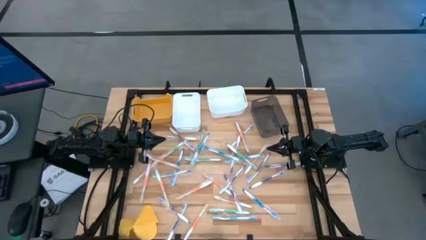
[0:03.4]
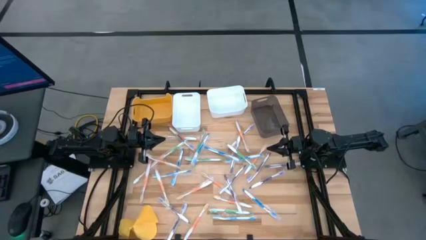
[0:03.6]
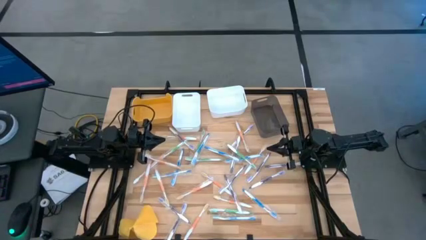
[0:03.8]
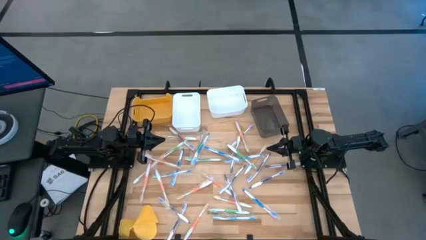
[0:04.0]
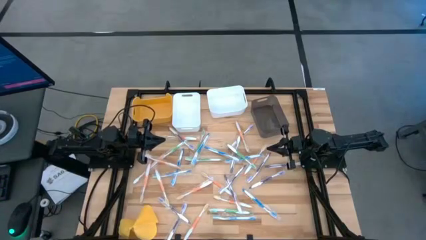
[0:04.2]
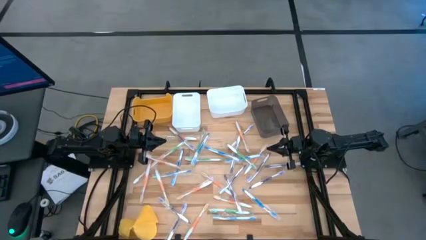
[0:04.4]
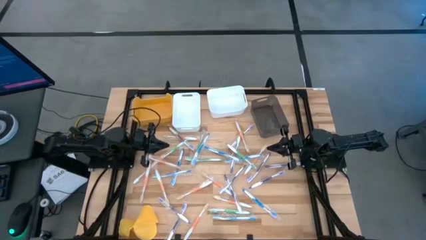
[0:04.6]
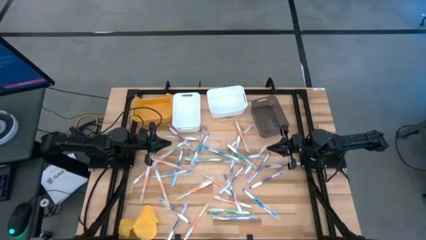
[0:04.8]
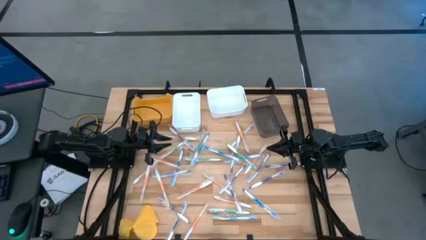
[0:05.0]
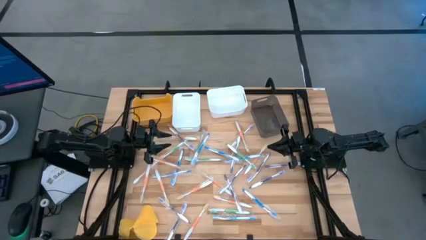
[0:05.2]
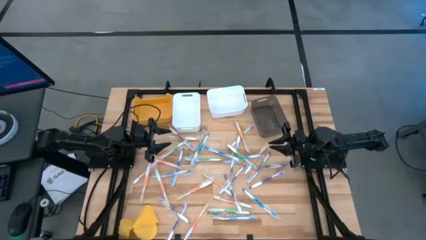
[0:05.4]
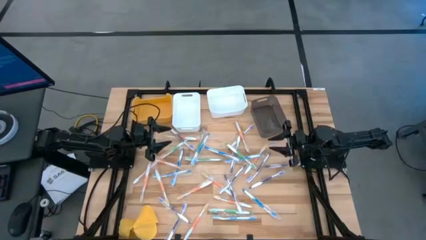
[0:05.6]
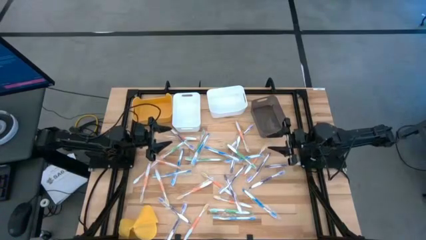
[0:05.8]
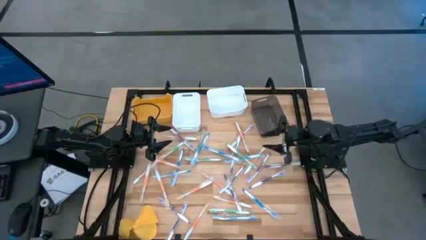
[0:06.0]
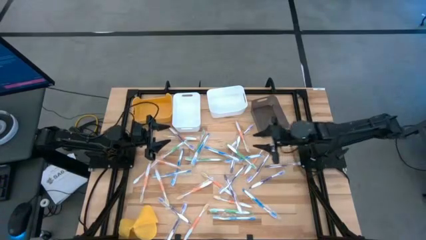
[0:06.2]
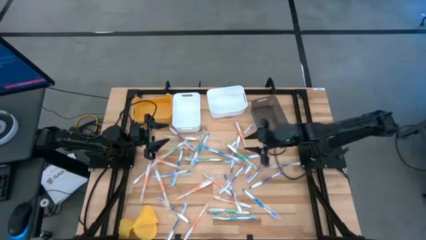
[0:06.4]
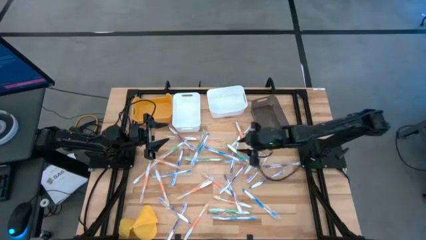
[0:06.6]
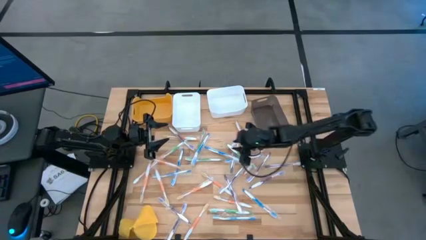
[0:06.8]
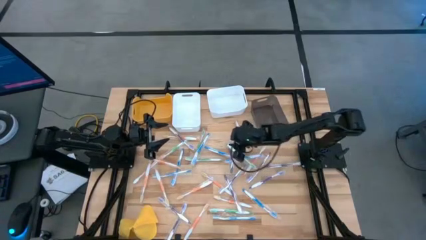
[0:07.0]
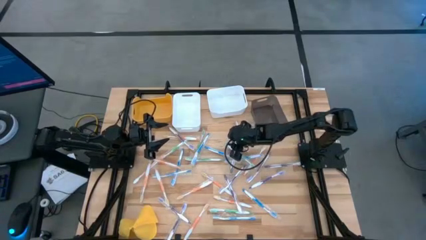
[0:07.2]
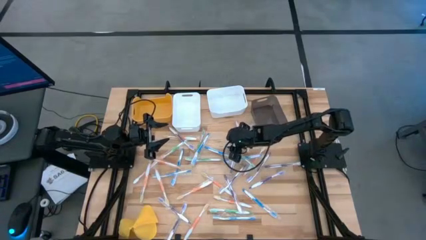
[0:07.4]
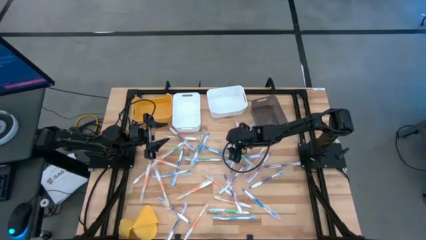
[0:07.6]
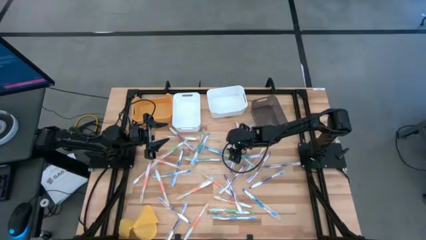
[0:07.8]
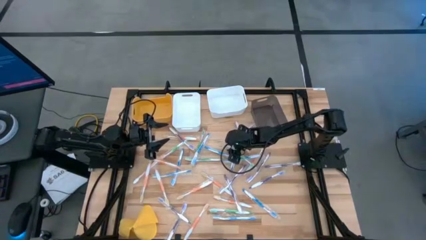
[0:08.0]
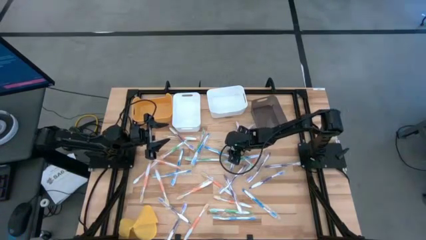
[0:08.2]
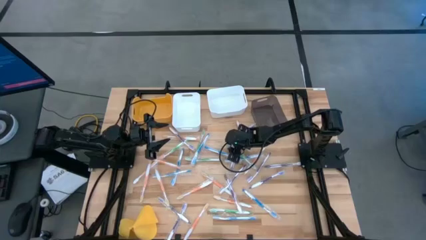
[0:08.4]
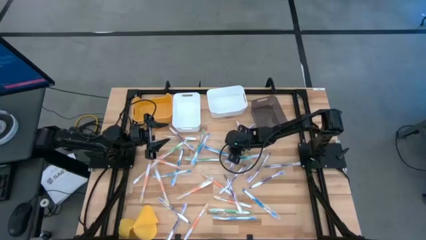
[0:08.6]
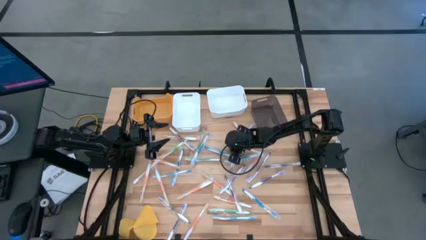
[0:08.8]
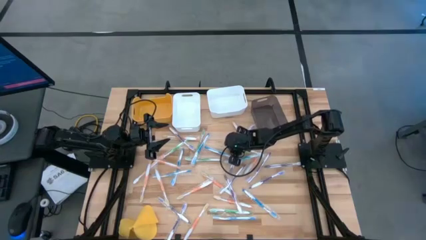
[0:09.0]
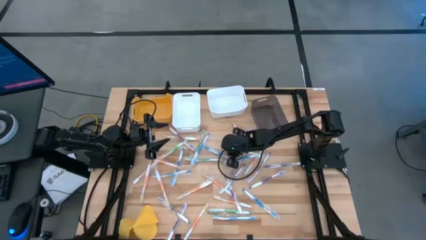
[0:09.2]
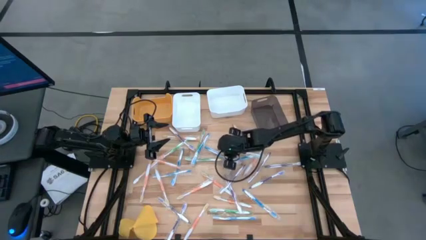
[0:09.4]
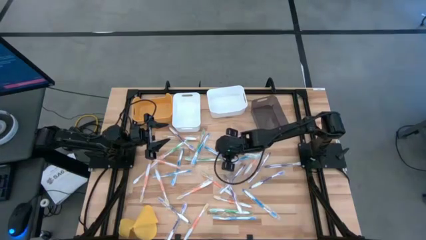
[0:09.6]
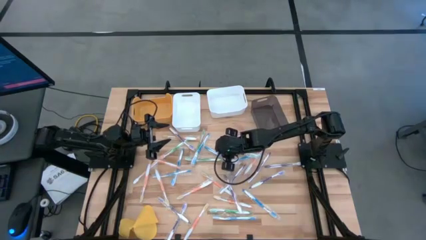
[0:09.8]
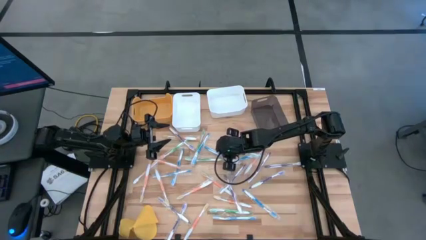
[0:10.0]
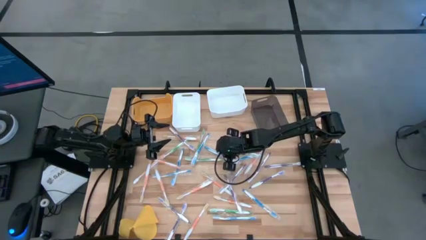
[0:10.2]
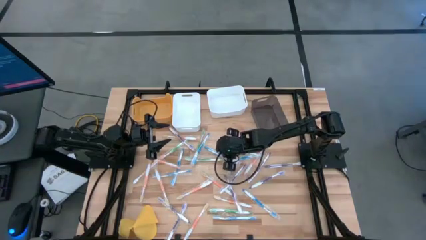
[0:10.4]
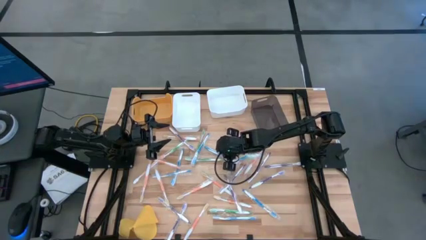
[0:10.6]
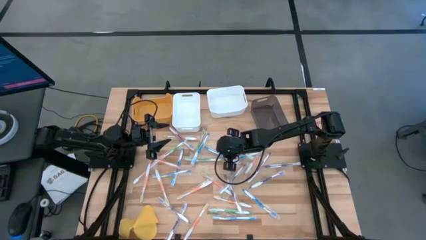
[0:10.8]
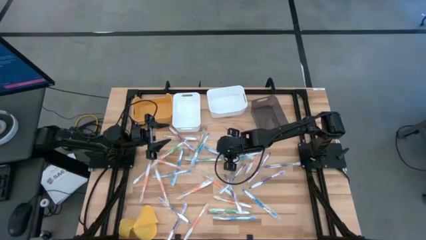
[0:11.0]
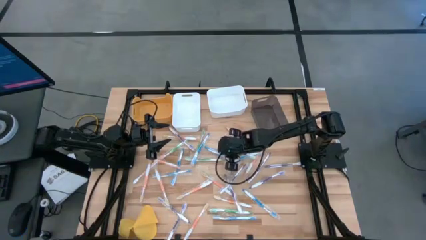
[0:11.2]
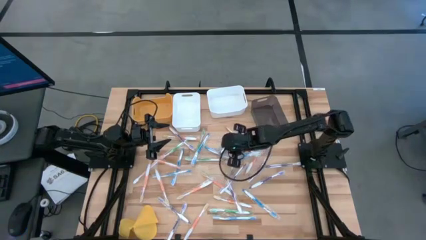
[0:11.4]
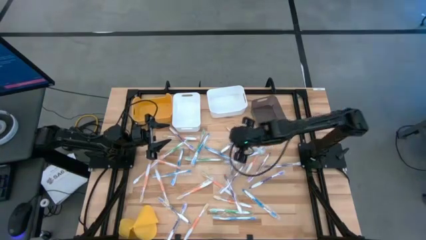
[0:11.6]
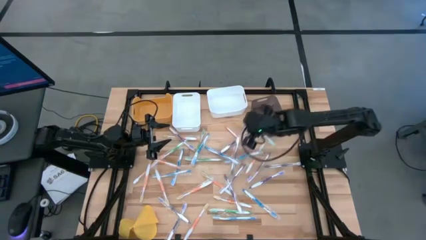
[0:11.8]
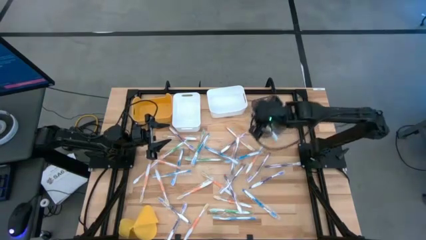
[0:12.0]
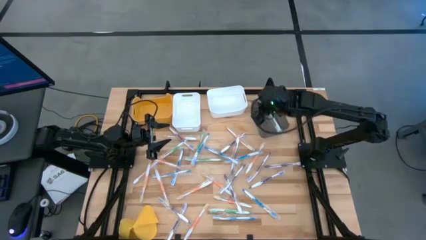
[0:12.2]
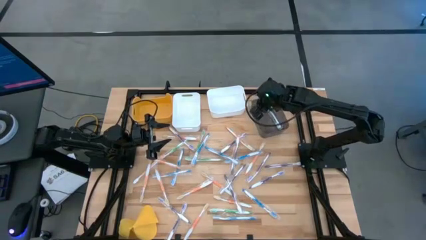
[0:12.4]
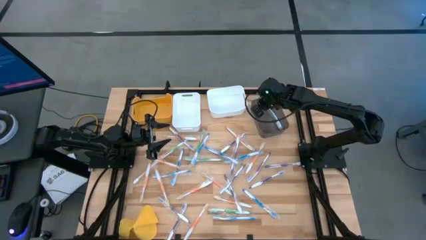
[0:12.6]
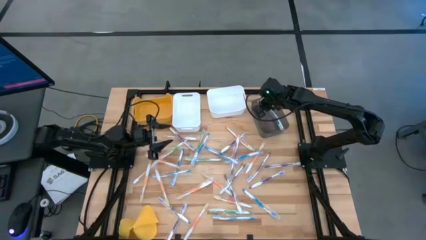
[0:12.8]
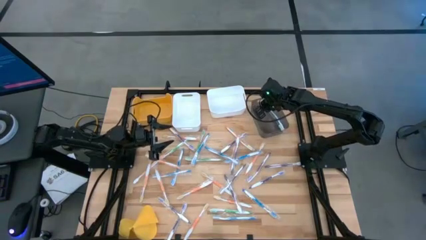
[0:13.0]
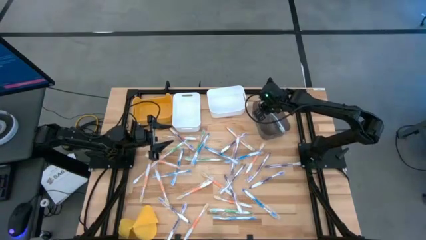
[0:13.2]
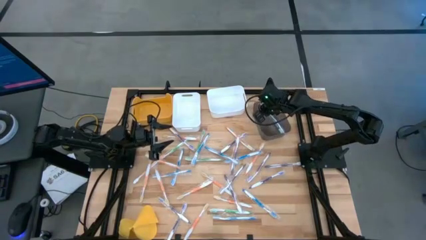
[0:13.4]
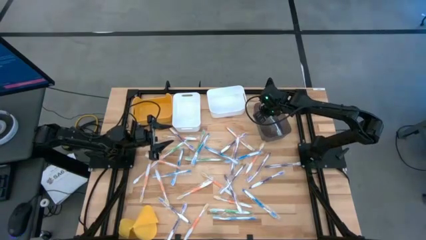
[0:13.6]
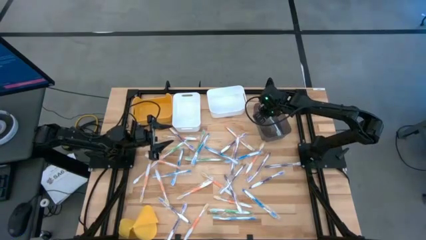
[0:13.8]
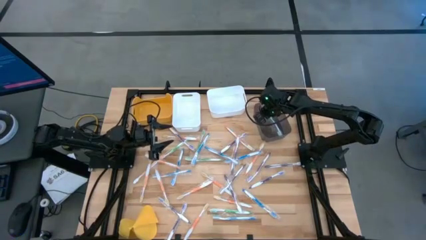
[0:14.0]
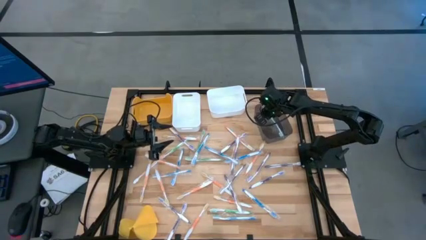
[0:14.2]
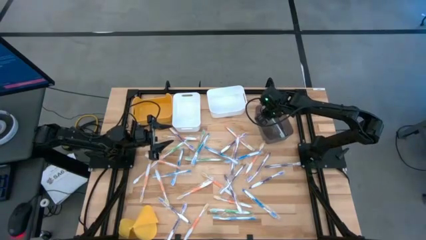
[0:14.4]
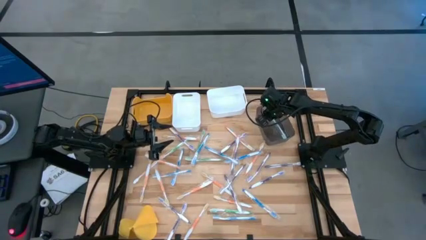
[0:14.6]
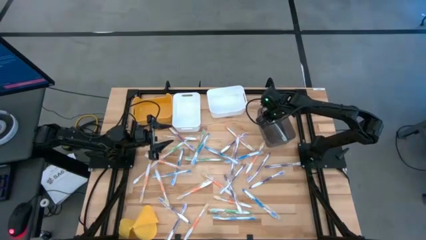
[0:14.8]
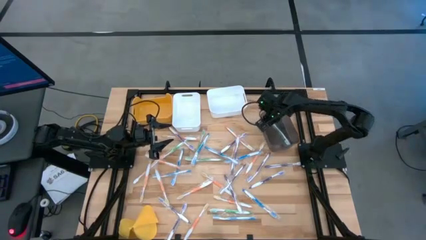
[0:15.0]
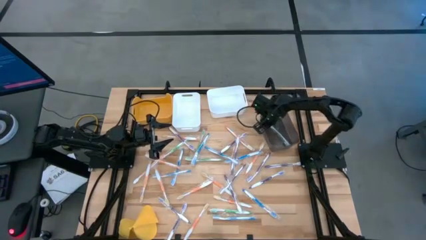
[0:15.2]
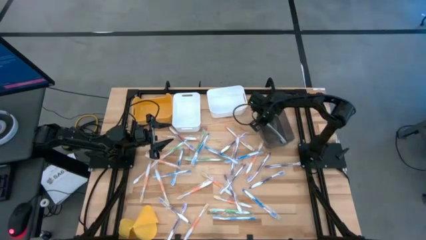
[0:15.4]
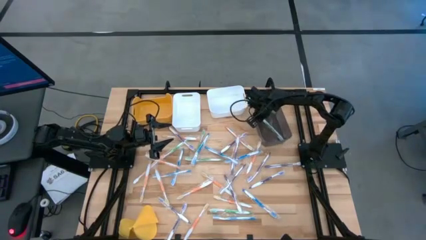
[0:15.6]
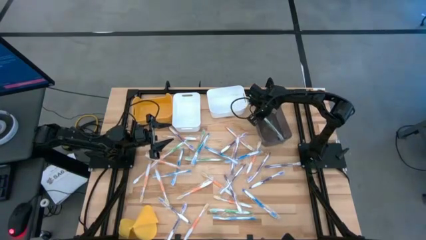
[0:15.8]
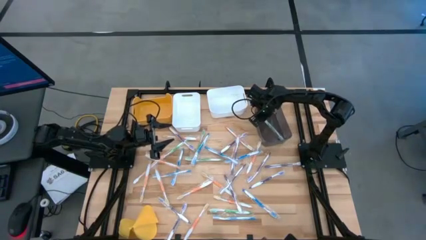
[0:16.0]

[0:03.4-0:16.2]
Task: Pick & Place Toothbrushes
Put the green toothbrush into the black bin
